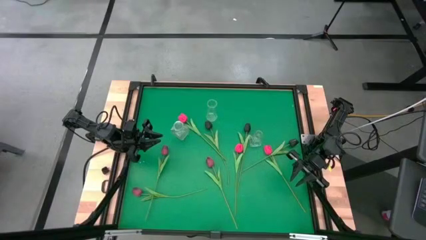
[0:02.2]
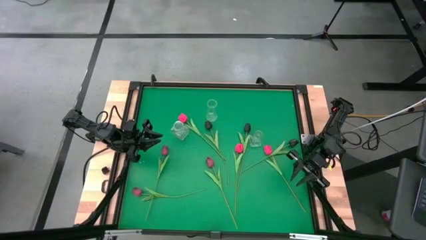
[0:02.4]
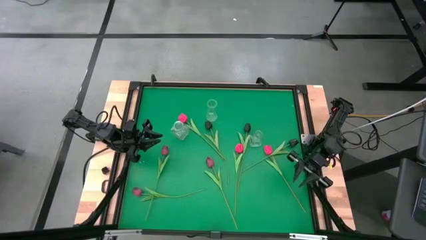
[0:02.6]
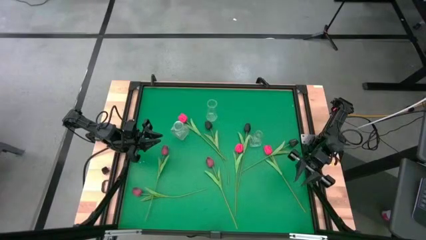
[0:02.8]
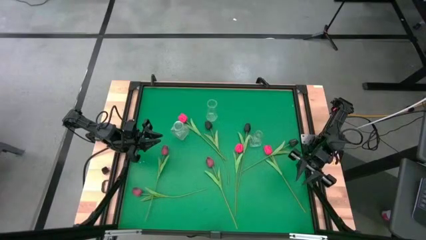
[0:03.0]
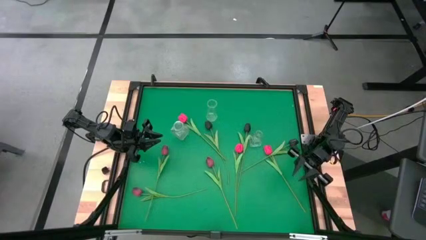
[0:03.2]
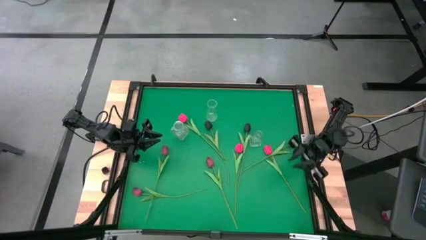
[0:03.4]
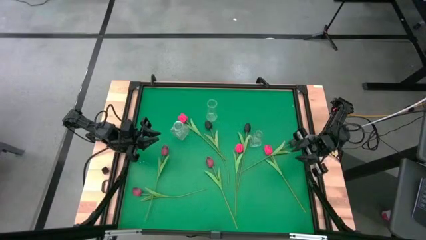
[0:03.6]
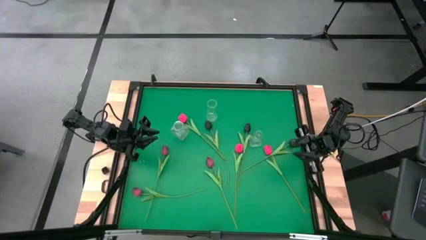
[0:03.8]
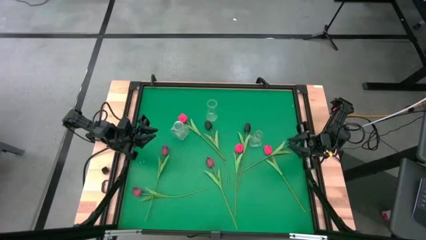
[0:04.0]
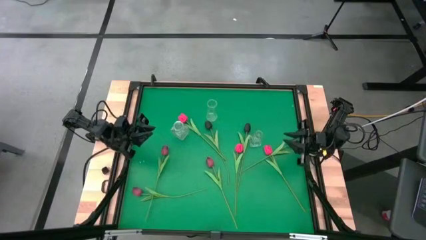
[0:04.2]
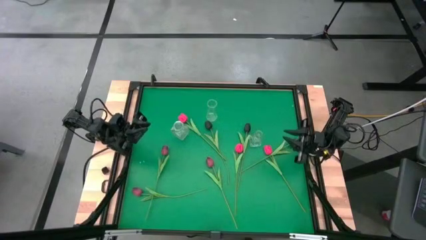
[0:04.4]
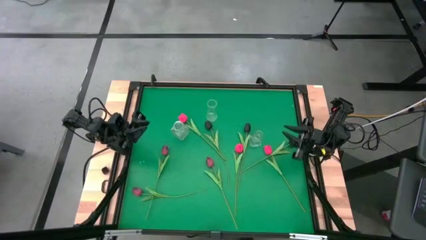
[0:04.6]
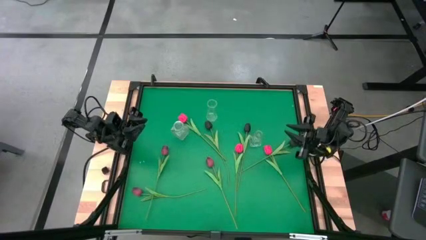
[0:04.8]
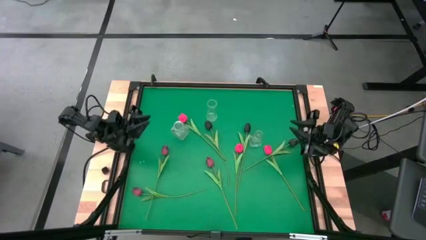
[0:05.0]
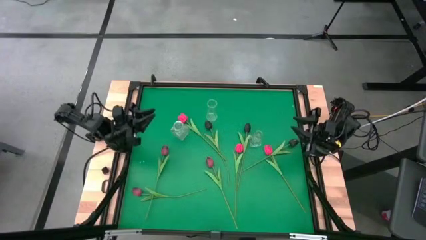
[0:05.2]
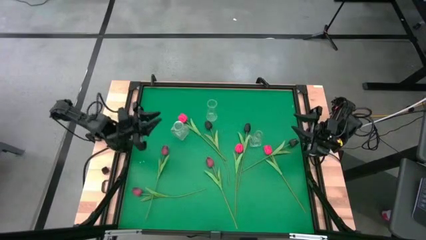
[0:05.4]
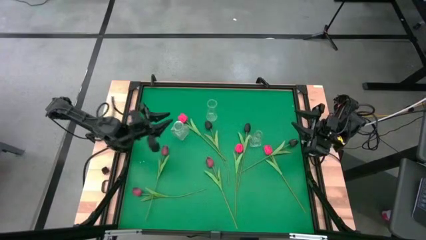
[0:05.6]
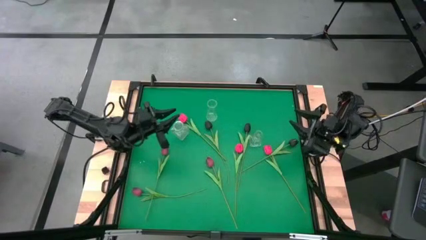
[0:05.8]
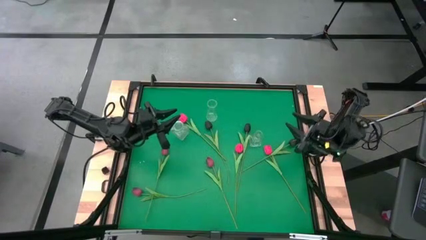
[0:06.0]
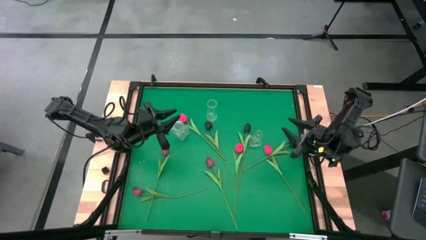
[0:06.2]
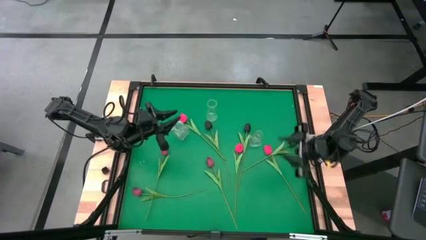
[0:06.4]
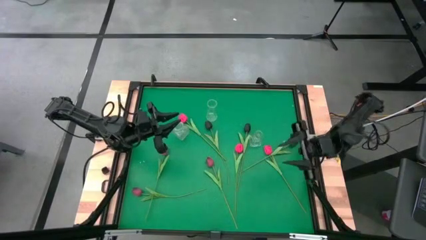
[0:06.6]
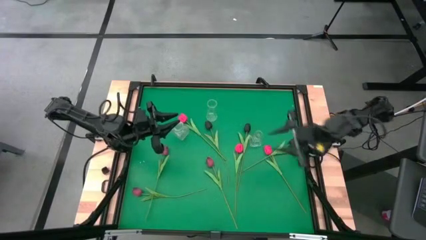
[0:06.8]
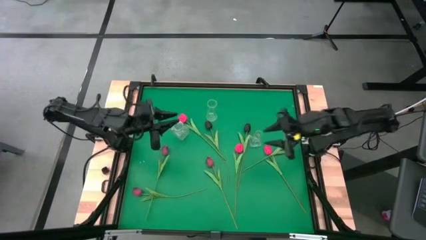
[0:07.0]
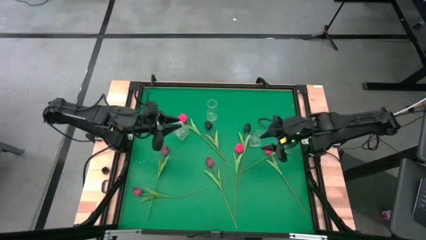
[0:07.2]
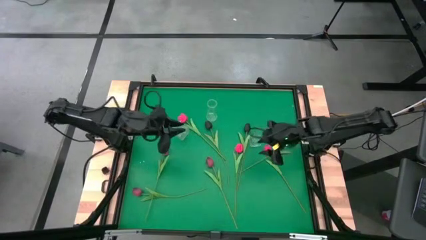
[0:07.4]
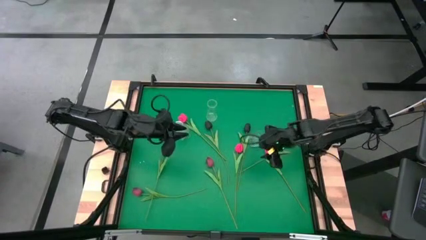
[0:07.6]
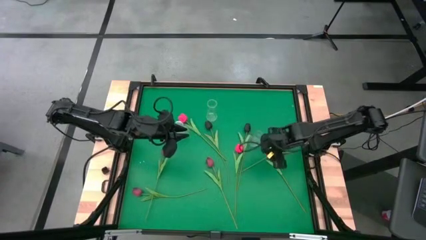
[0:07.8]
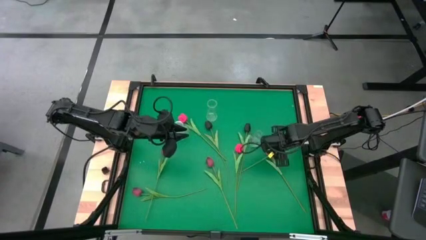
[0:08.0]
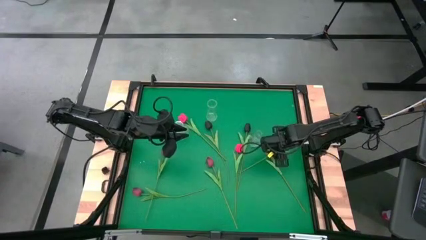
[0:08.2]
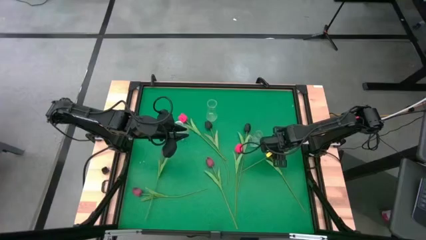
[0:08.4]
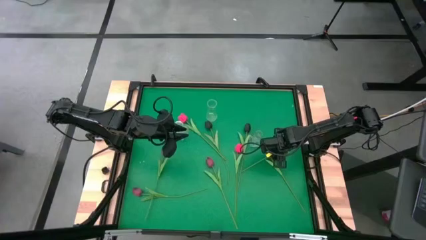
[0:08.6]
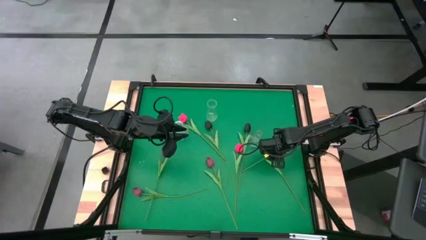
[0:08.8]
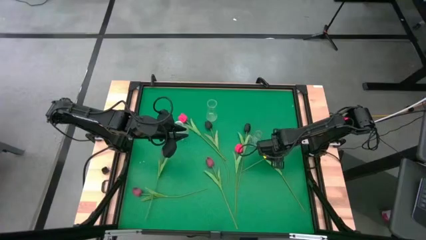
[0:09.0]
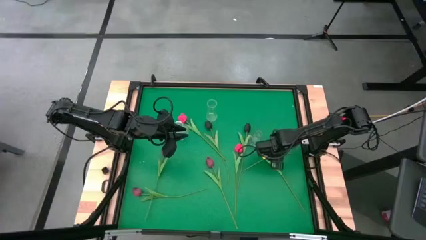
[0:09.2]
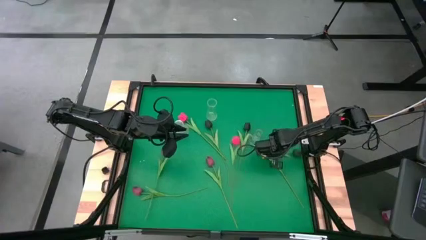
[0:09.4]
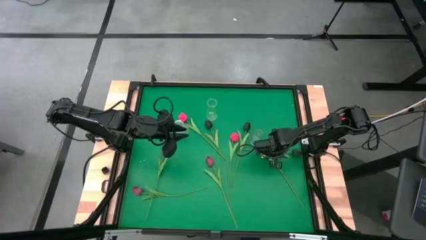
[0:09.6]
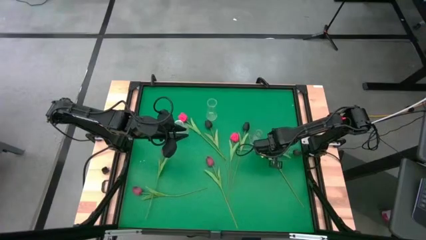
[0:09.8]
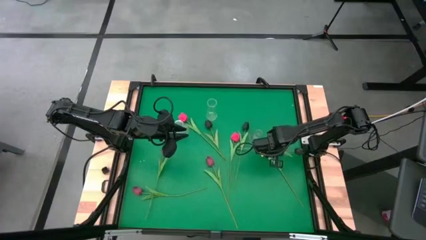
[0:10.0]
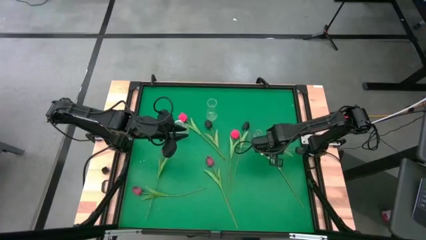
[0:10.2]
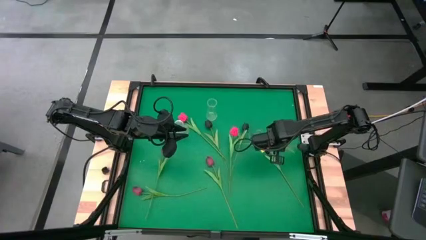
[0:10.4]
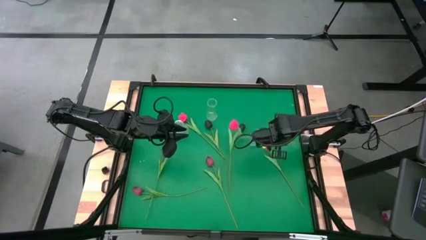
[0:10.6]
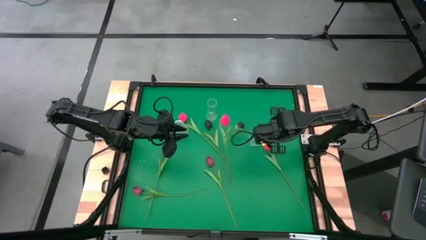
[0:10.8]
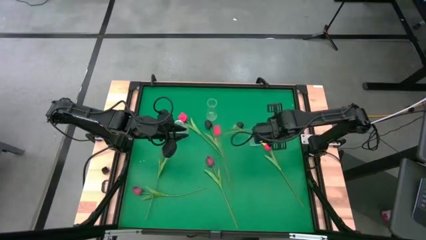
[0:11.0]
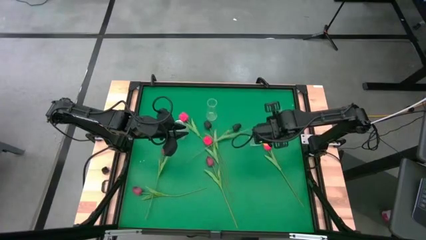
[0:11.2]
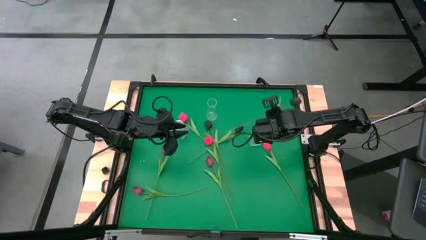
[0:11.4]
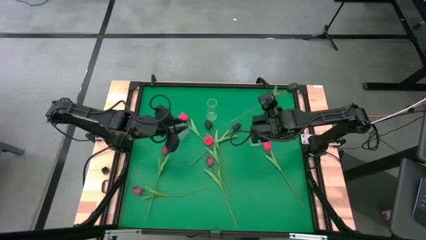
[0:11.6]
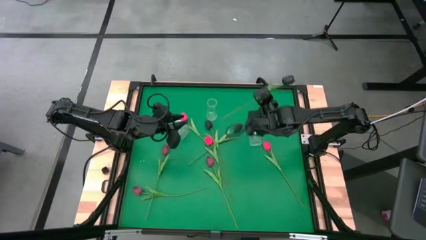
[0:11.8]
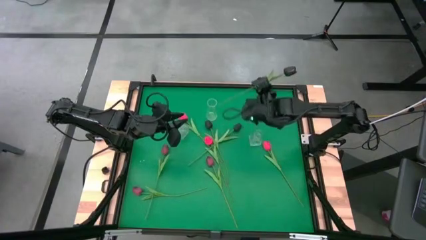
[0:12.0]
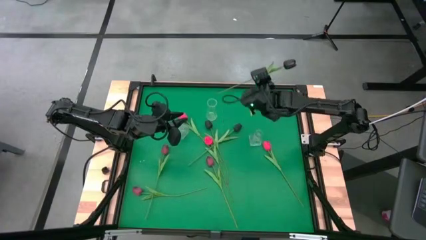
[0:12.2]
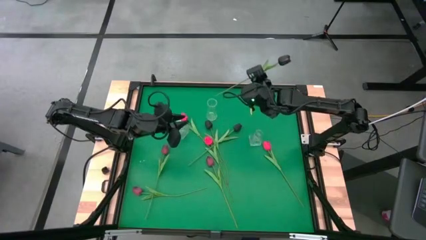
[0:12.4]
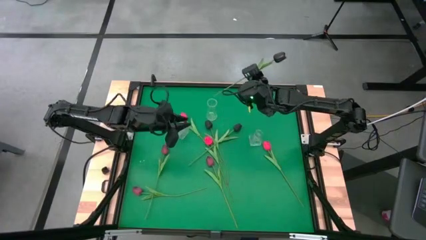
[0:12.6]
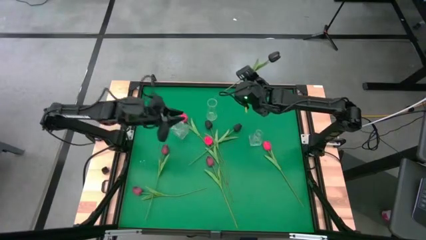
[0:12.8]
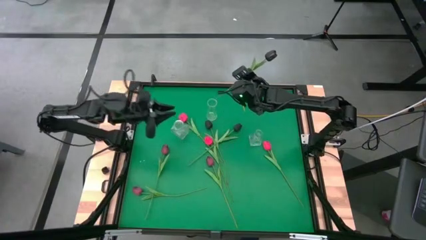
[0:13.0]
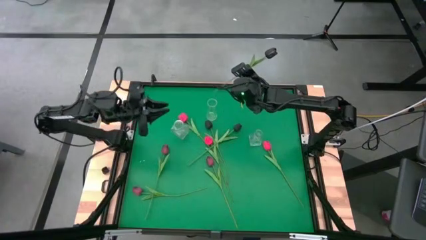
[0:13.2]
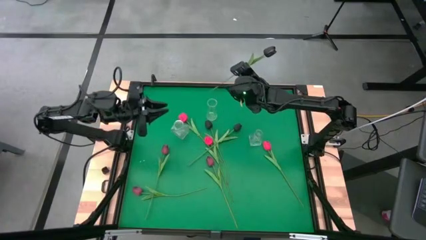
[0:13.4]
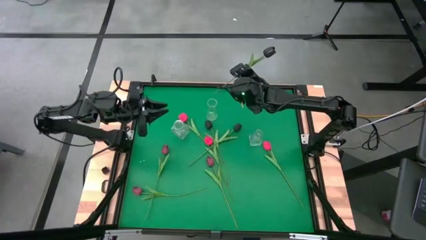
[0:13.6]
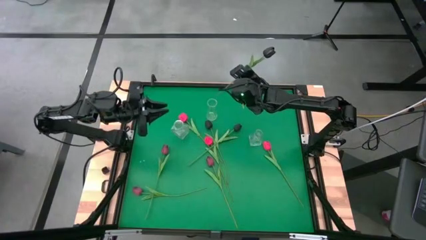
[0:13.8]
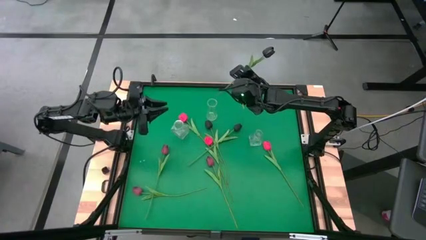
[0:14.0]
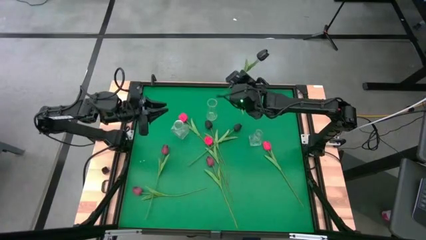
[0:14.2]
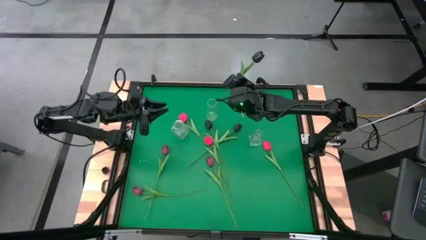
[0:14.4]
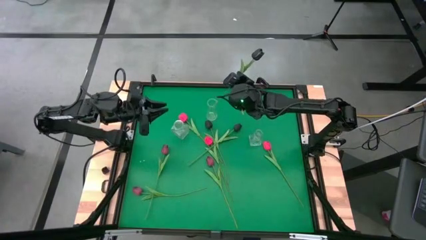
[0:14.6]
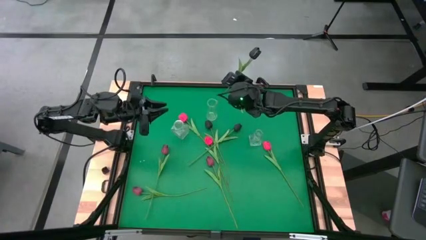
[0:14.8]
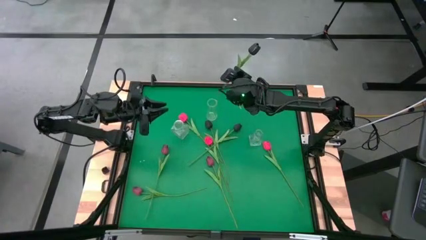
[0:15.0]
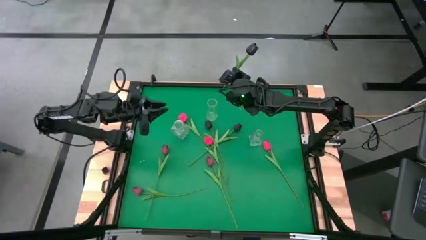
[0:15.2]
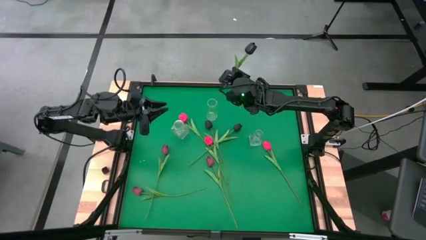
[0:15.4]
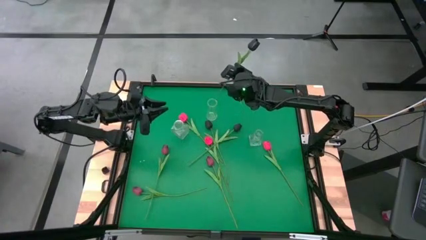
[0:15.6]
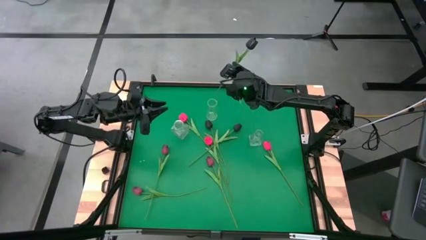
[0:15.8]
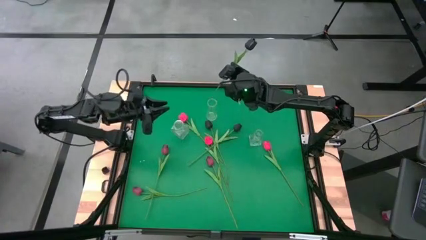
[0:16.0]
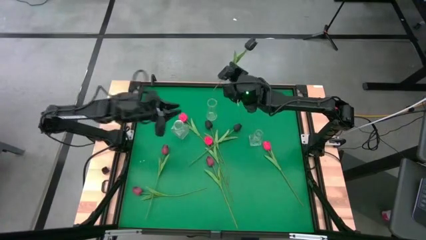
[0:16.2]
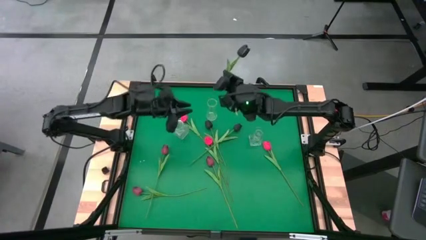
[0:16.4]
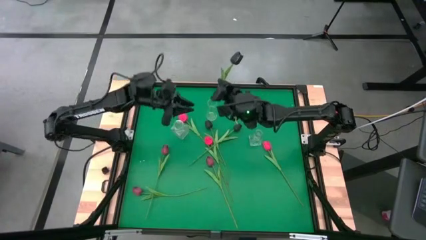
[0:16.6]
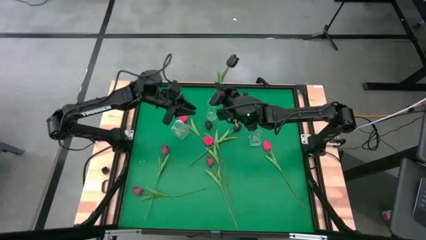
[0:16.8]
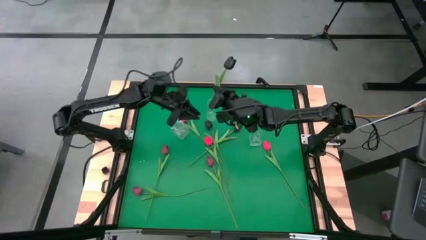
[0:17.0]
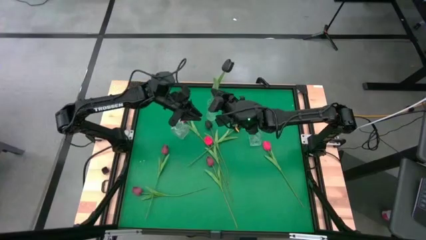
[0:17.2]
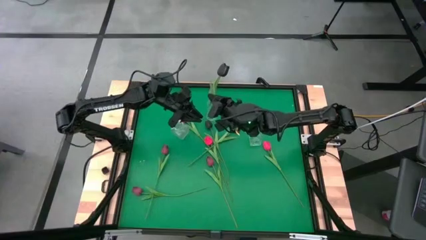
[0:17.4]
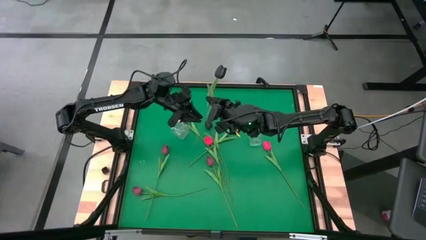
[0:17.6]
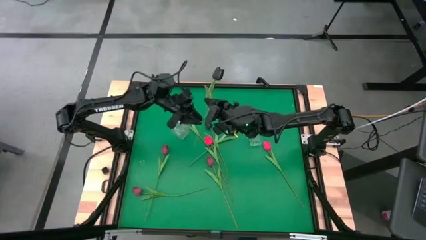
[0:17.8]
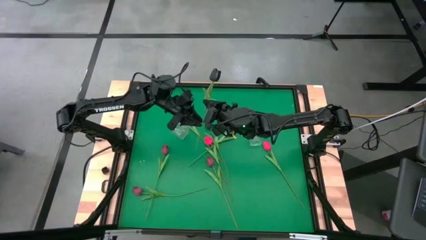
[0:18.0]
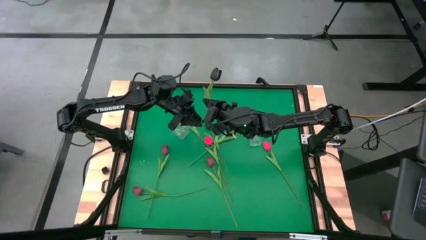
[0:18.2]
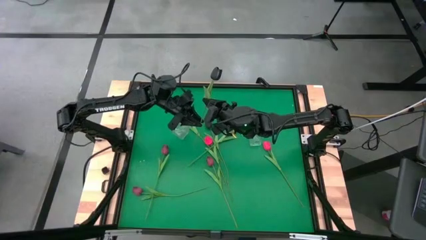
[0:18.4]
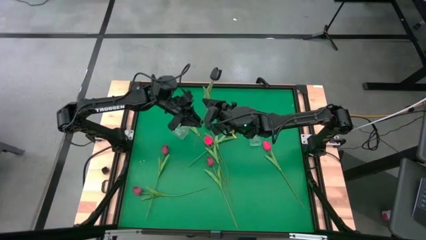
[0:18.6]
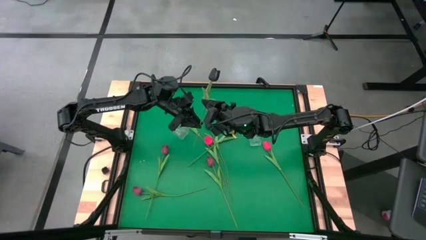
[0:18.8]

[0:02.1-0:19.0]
Task: Sort flowers into vase by color
Put the right black tulip into the top transparent vase
